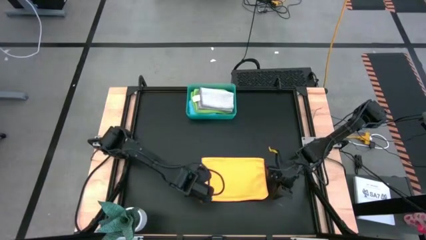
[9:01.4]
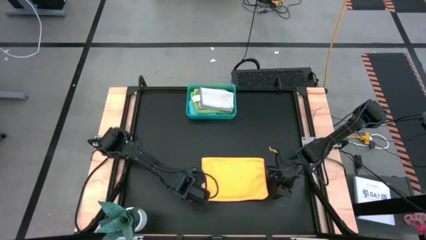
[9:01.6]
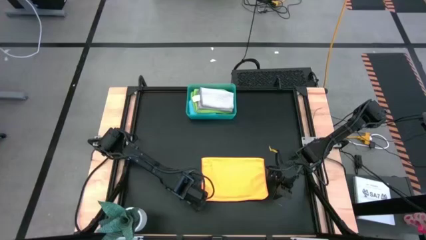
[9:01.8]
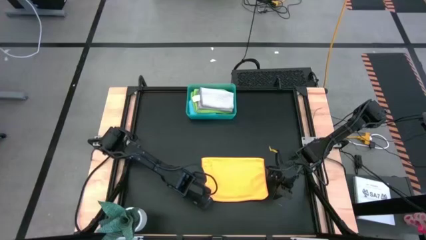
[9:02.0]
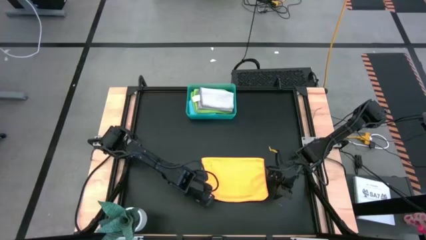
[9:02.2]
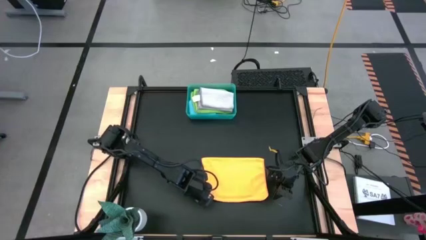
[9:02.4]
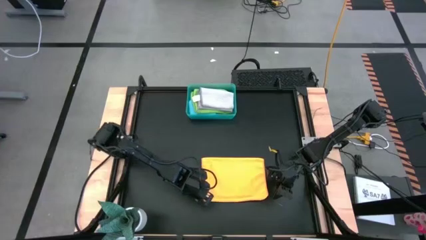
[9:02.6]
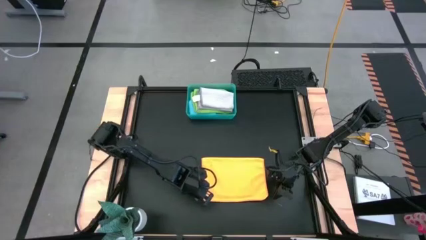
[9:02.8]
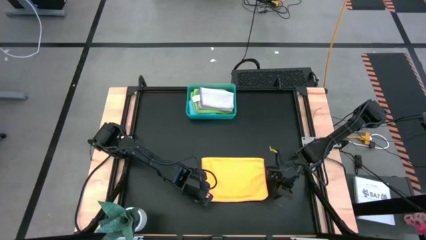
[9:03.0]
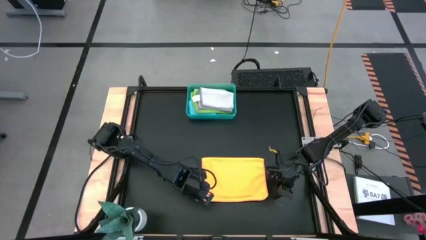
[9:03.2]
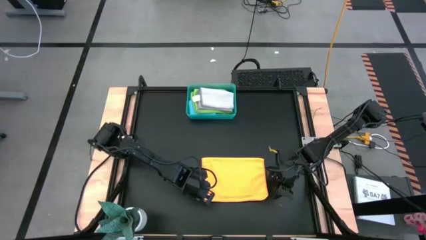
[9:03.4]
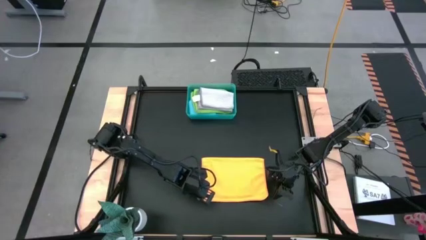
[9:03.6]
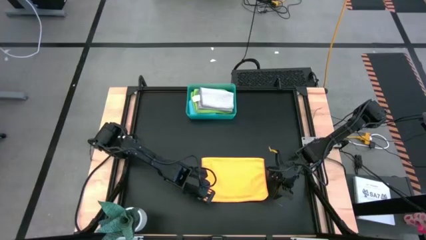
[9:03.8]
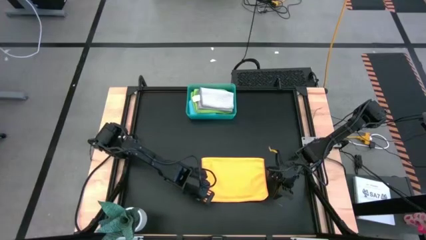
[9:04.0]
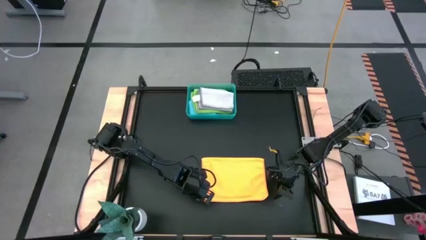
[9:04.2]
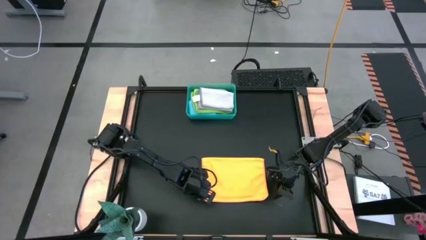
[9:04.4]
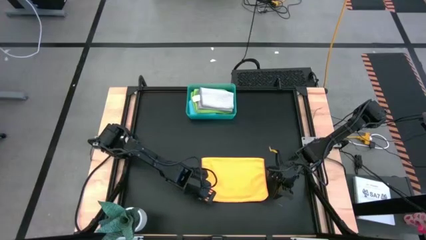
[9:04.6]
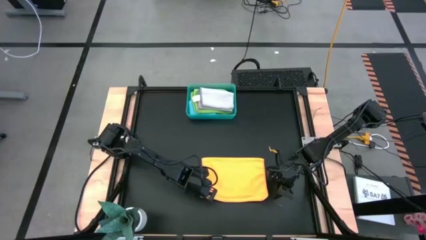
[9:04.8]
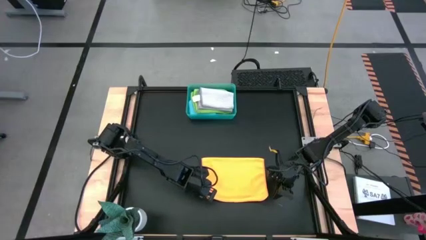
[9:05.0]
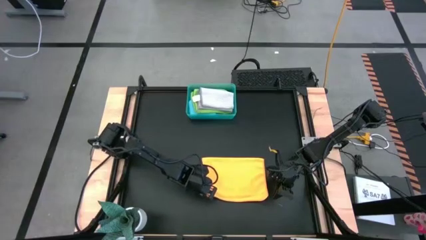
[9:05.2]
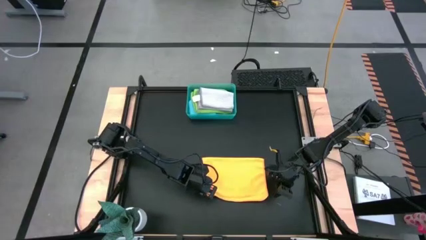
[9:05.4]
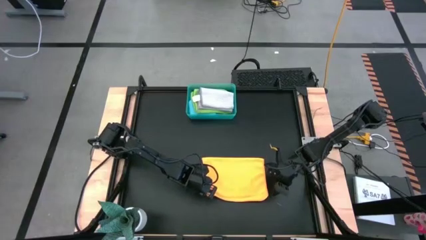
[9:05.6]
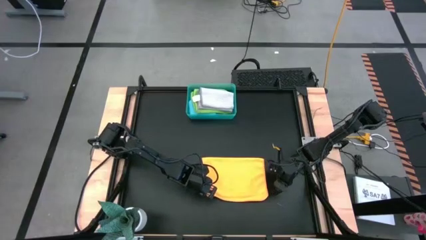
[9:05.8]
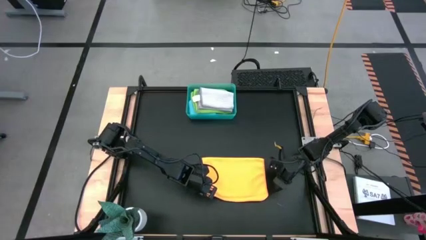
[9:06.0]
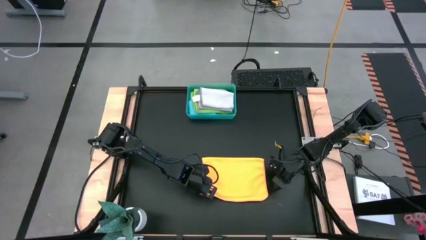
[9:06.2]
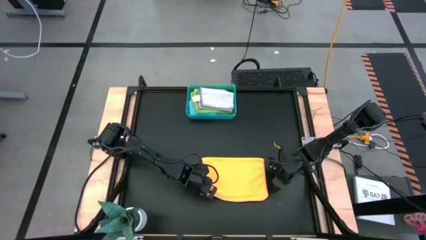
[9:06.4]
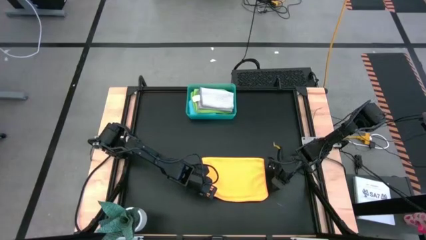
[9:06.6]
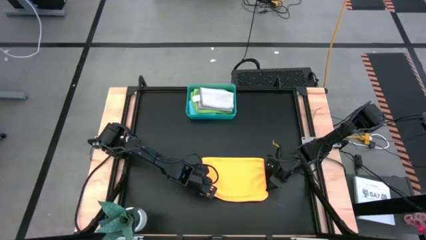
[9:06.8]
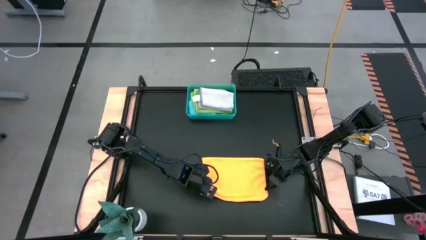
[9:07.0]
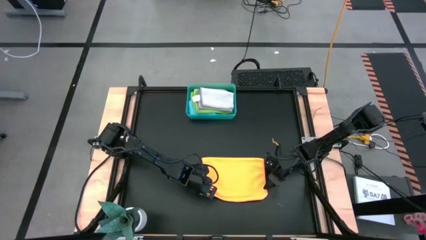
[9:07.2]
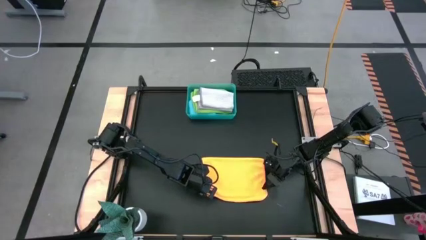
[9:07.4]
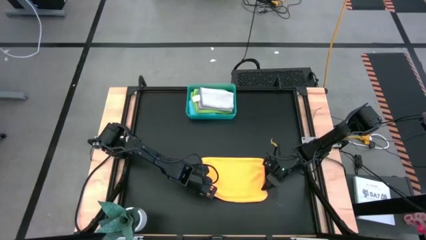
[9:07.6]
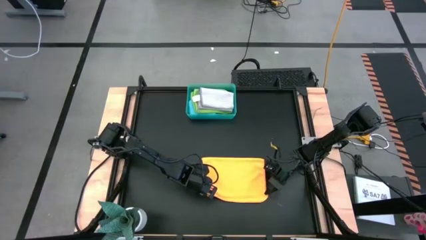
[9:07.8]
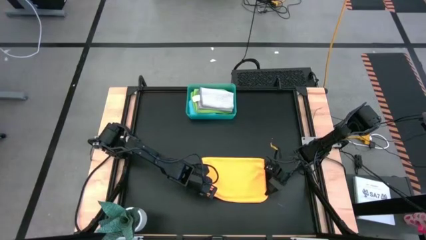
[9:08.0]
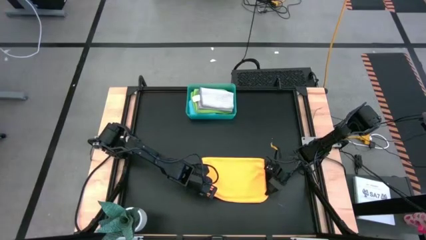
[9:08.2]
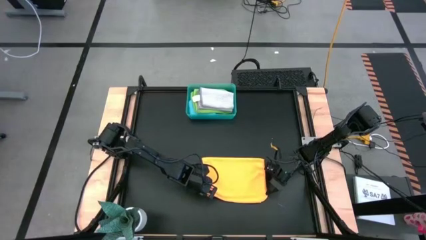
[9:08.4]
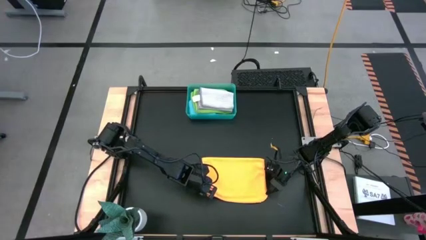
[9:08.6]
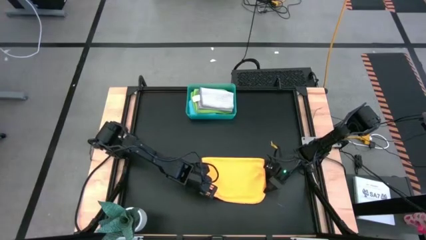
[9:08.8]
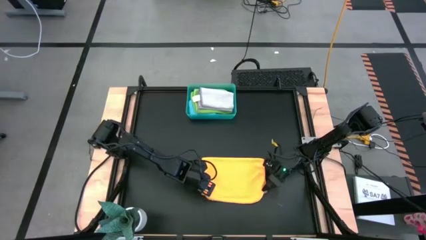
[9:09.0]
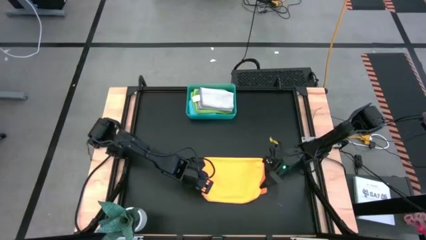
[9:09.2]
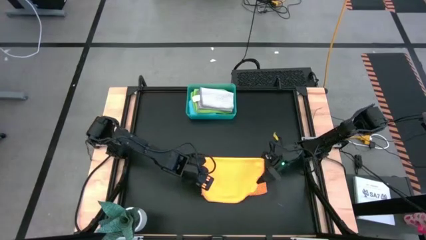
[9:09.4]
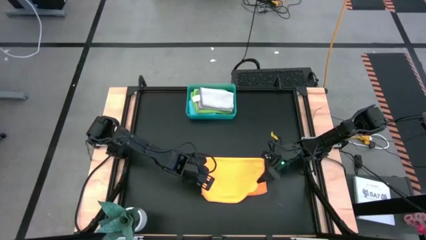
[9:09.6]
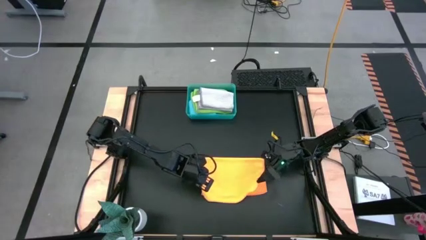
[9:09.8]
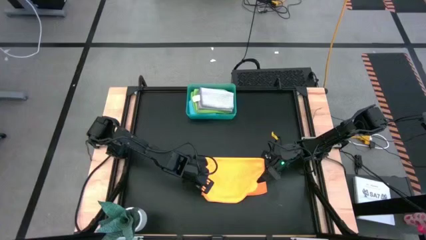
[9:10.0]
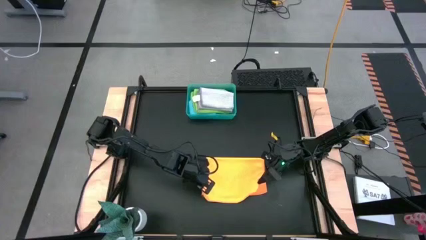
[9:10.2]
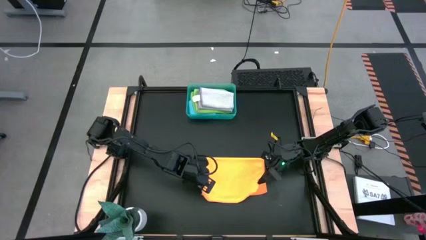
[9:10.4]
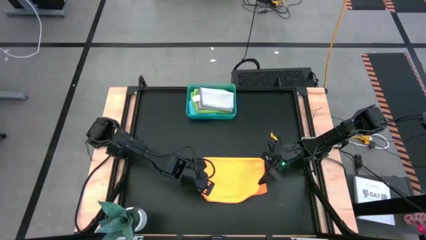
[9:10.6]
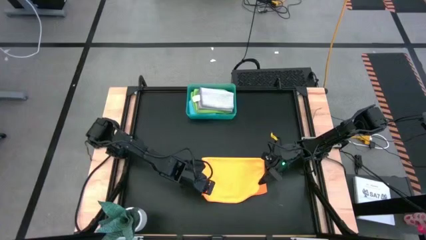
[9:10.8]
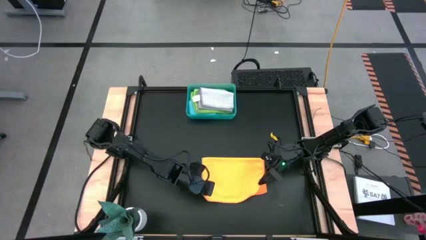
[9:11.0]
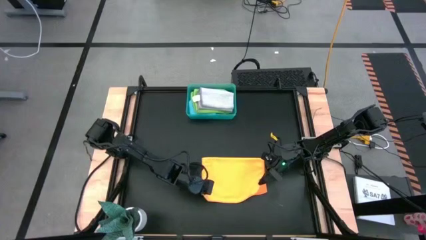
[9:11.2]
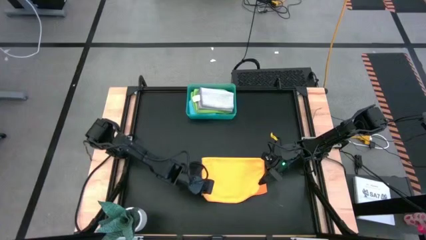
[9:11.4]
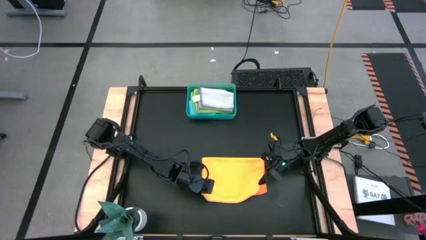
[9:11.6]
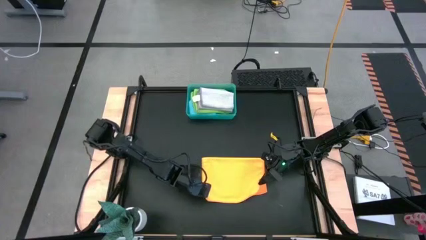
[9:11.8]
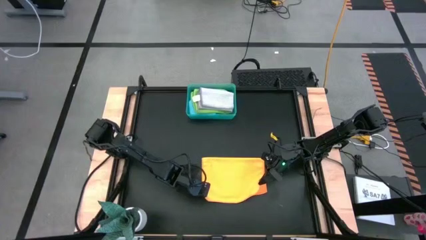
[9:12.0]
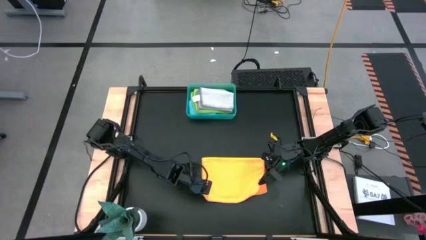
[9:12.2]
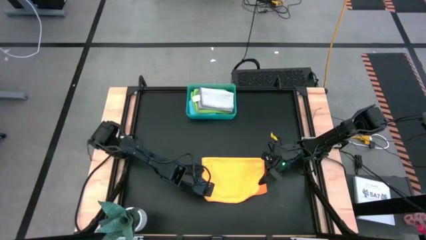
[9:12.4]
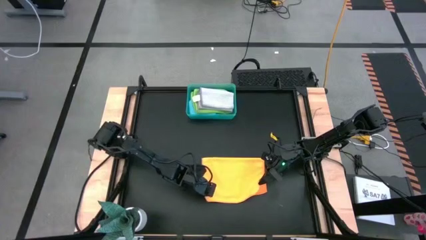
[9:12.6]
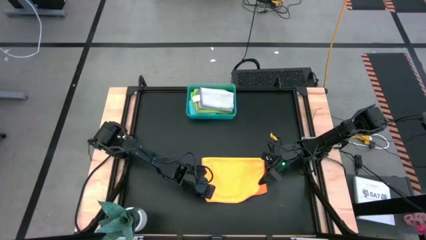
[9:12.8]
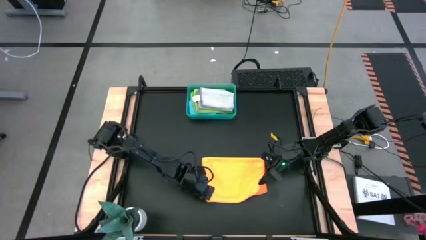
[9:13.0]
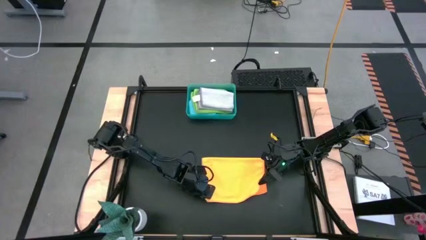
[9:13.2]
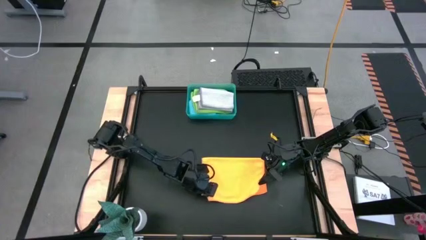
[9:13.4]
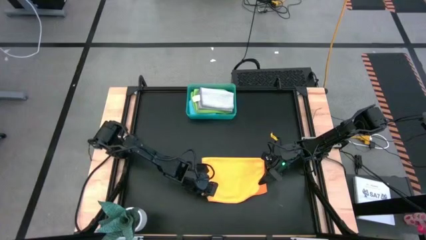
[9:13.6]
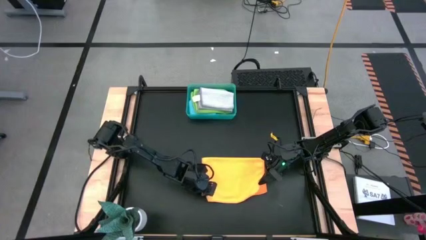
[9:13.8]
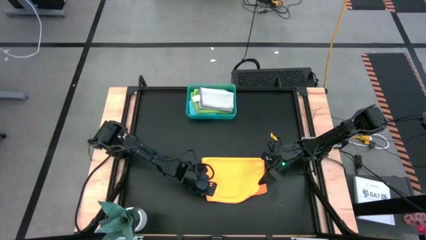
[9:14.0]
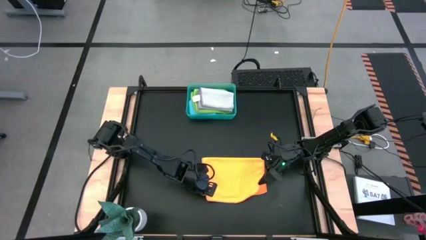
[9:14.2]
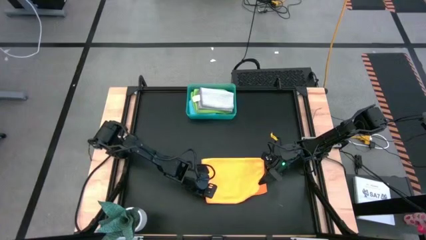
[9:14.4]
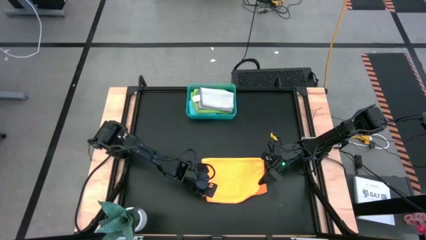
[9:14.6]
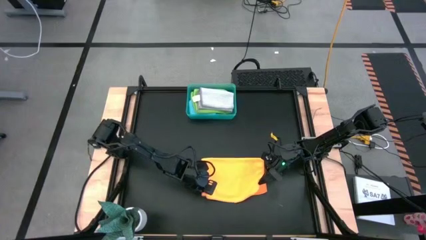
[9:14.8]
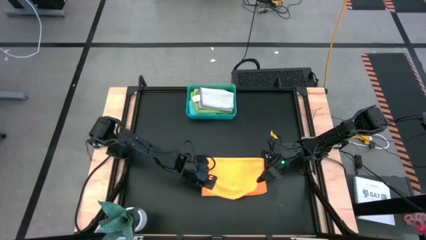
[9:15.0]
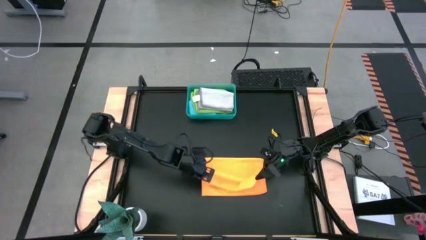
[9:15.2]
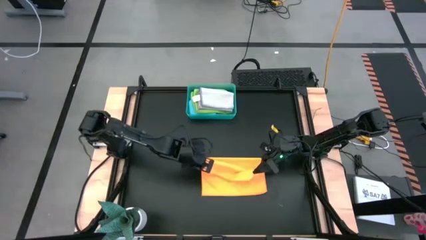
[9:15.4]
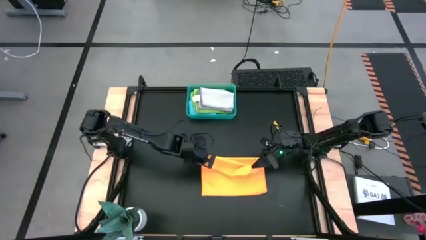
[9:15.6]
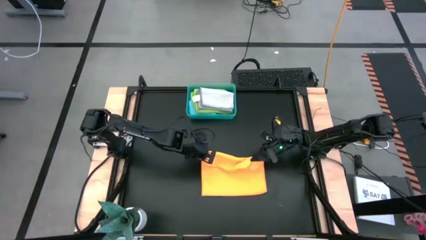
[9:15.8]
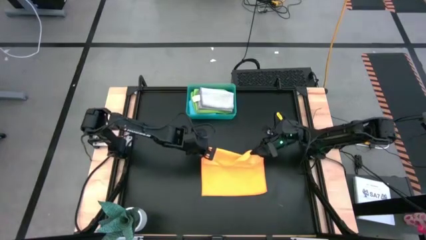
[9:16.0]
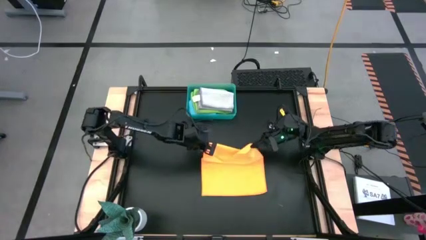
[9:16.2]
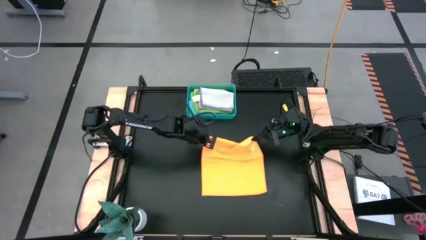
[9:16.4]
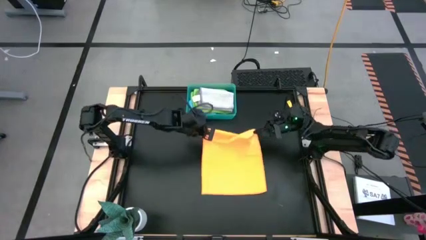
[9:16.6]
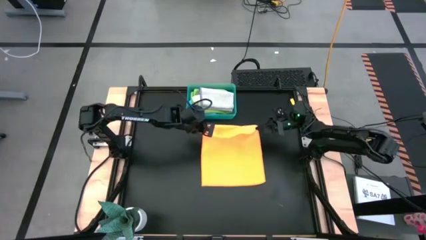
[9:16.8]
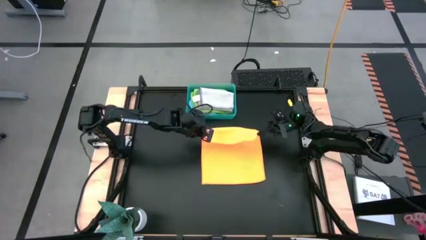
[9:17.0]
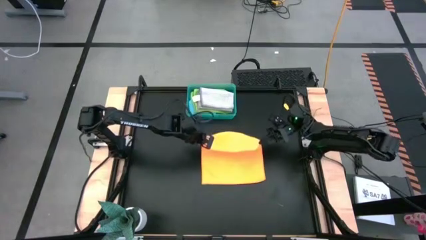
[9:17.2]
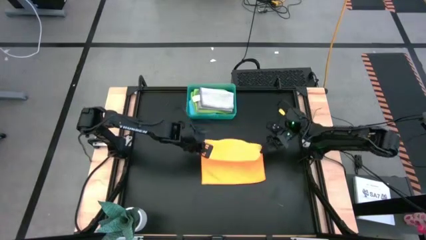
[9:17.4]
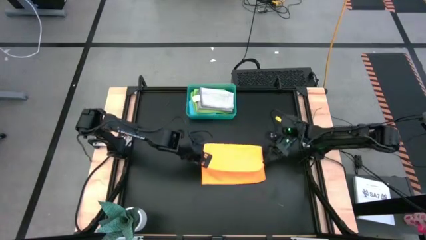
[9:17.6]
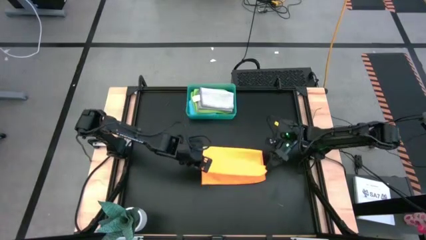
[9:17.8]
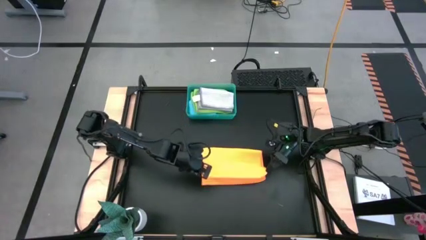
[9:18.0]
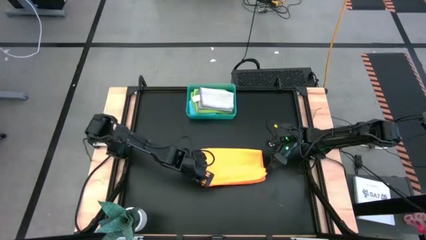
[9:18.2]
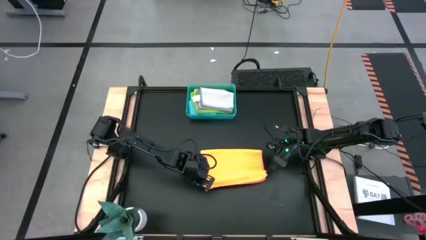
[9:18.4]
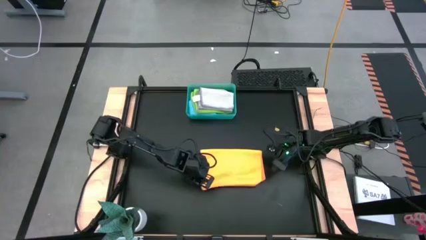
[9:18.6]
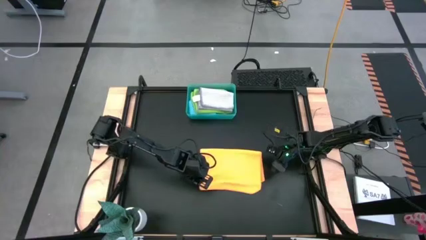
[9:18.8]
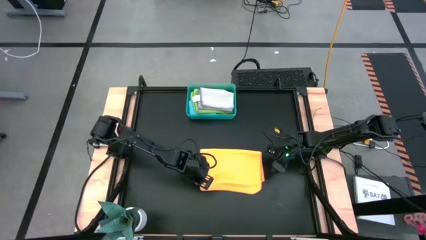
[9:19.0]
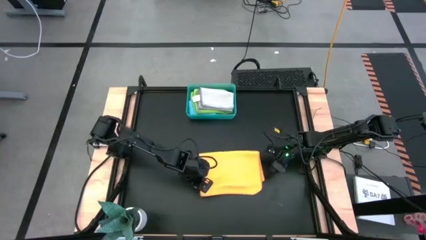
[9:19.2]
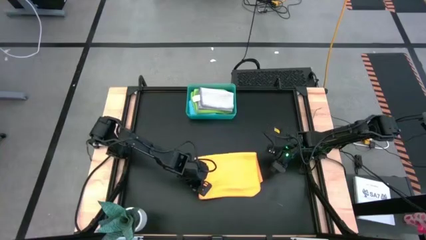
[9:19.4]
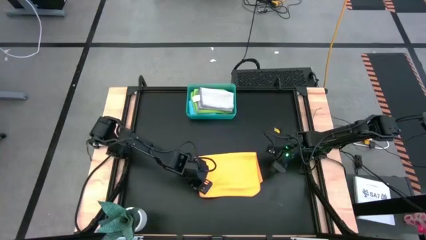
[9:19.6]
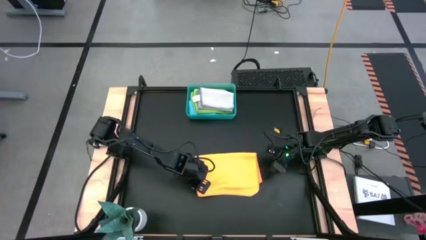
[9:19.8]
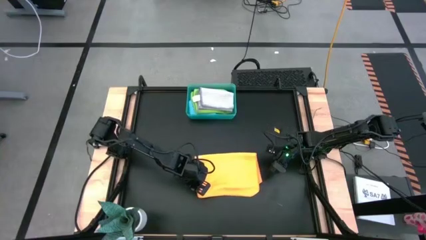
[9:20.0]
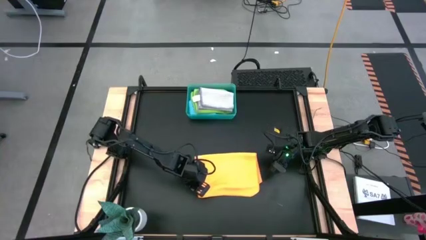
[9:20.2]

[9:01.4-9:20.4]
Task: Fold microfiber towels
Fold the orange microfiber towel
